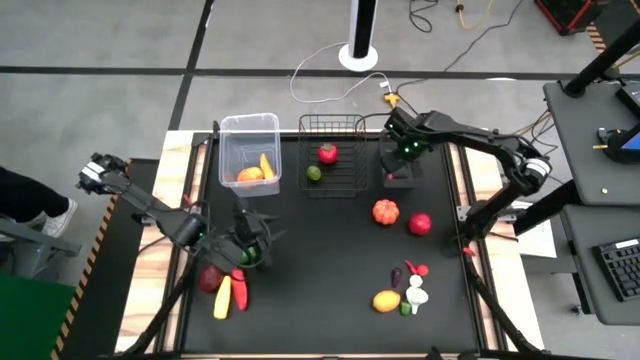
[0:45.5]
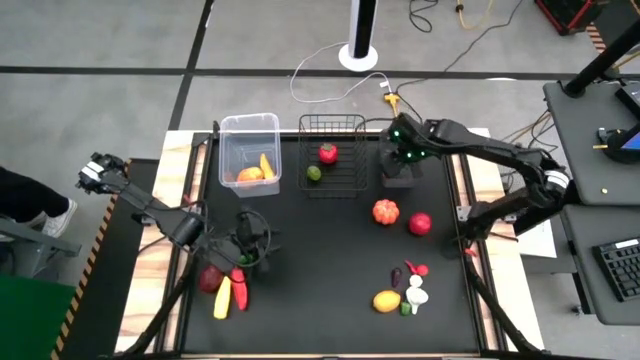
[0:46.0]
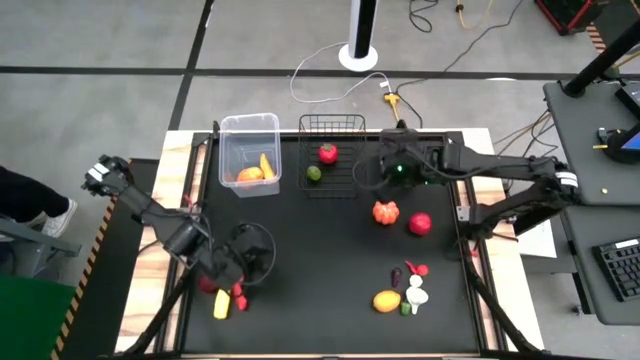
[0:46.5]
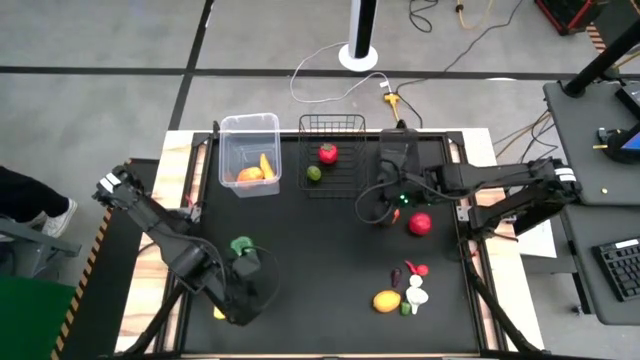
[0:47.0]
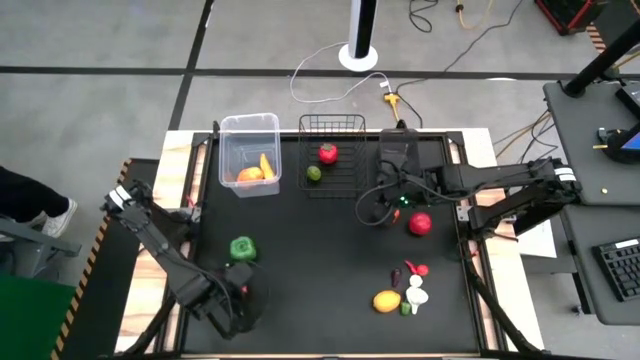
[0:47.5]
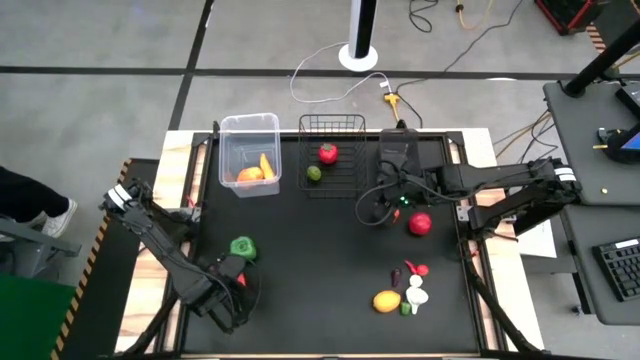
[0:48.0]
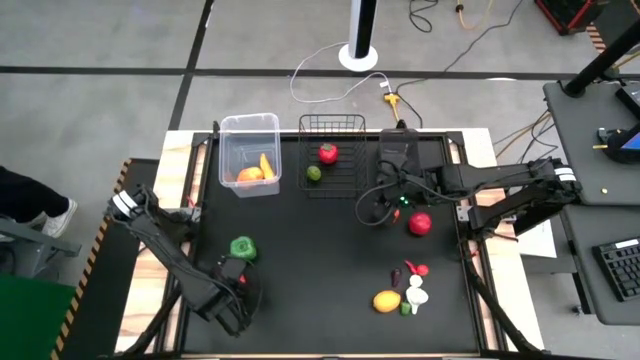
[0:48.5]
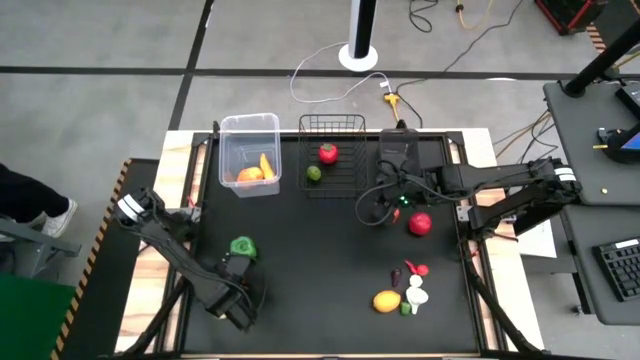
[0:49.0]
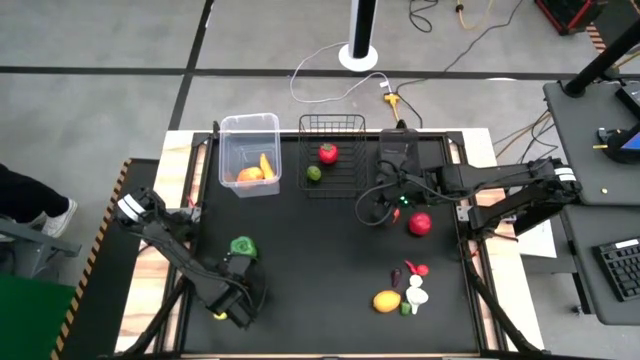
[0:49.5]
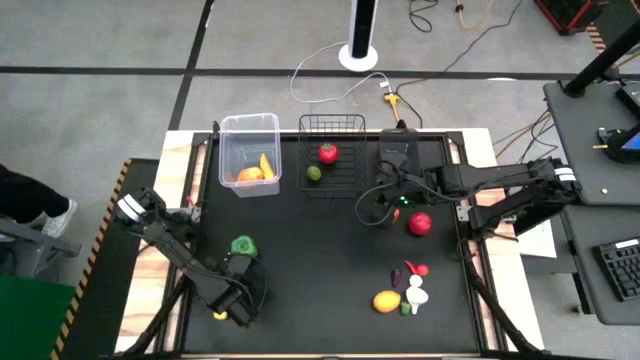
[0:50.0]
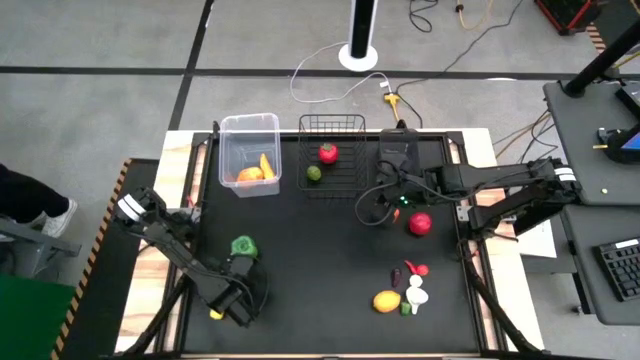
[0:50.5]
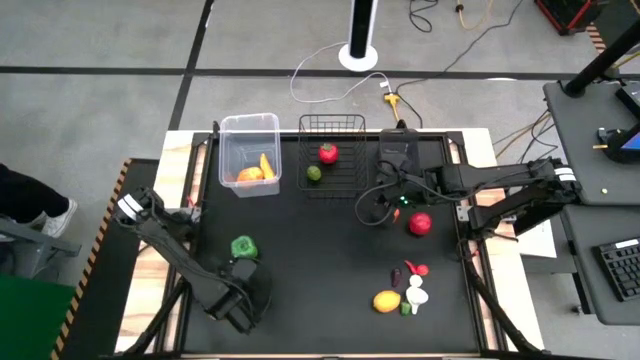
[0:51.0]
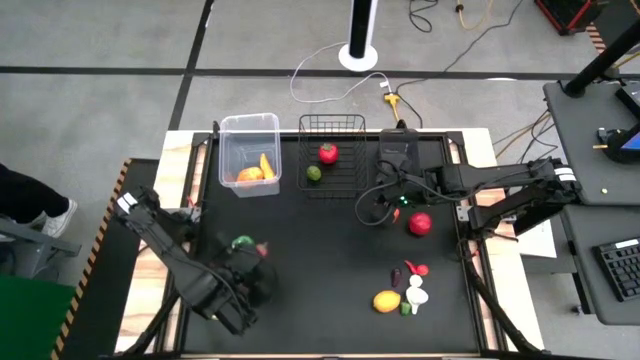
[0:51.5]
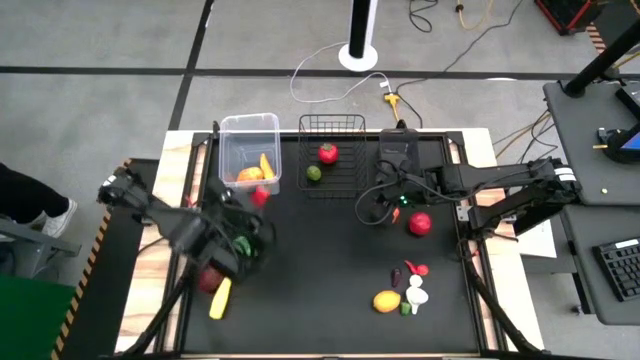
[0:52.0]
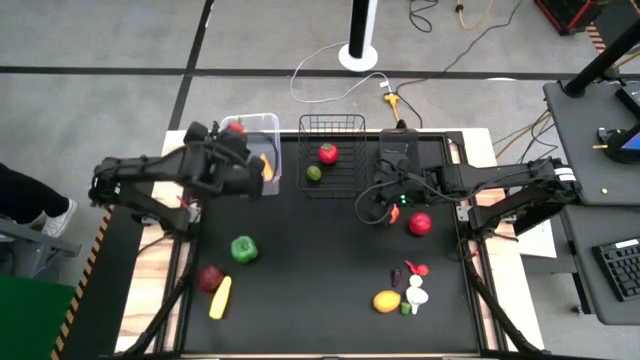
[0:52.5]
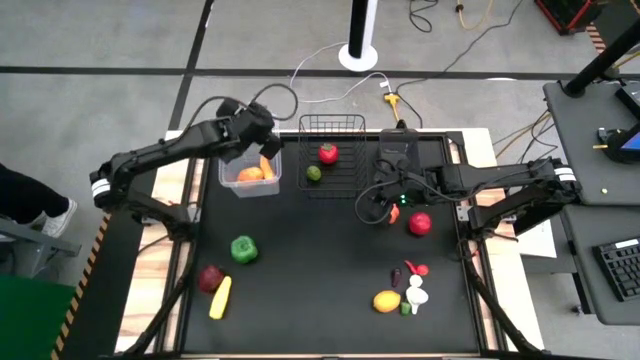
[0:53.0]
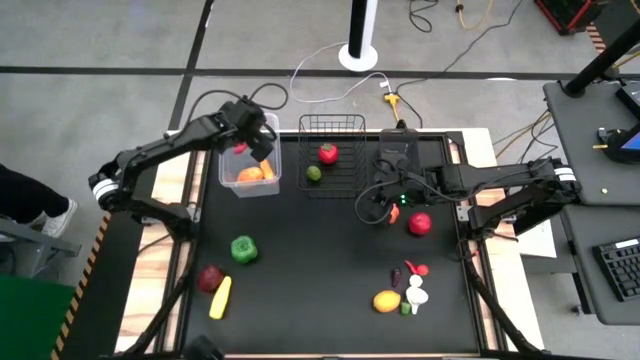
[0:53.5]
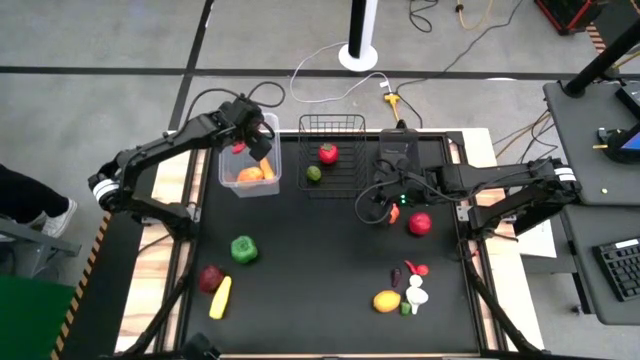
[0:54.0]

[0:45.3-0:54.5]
Task: Sort produce into baskets
Put the red chili pepper into the transparent basket

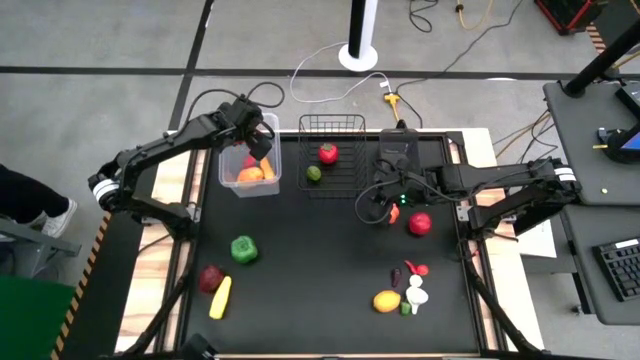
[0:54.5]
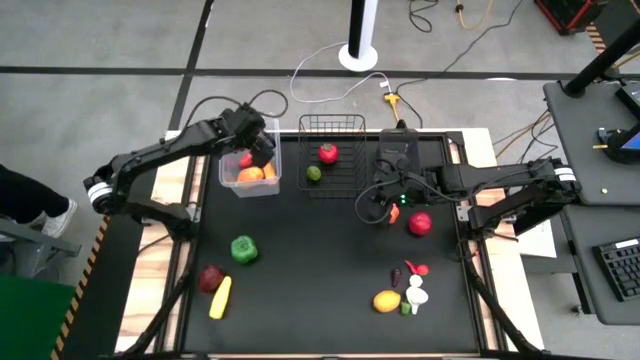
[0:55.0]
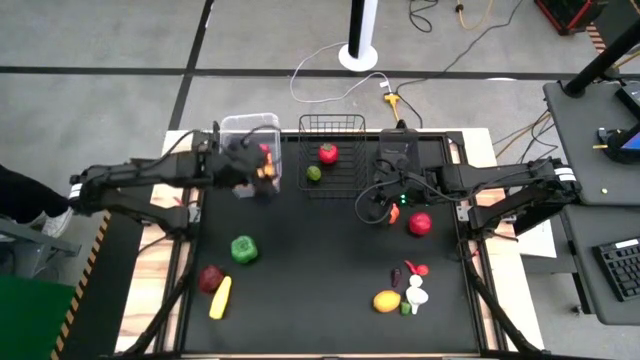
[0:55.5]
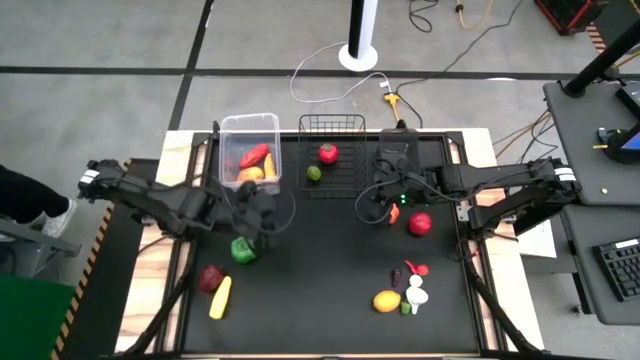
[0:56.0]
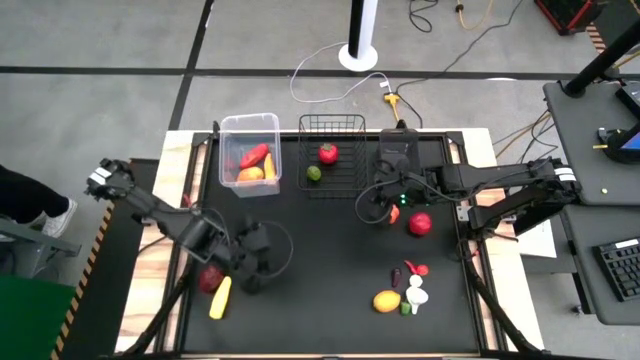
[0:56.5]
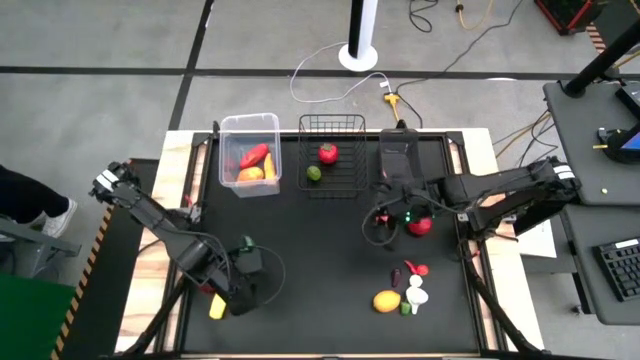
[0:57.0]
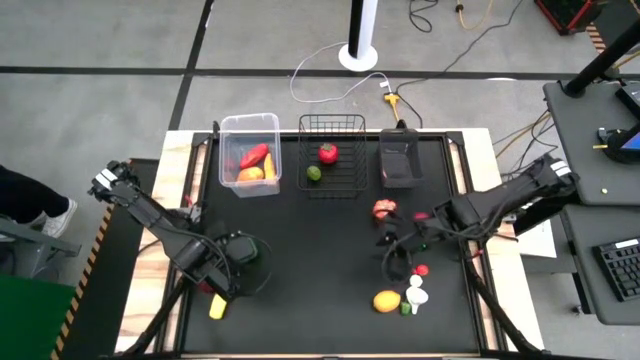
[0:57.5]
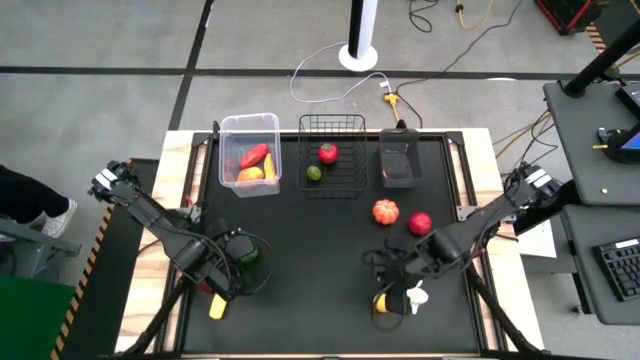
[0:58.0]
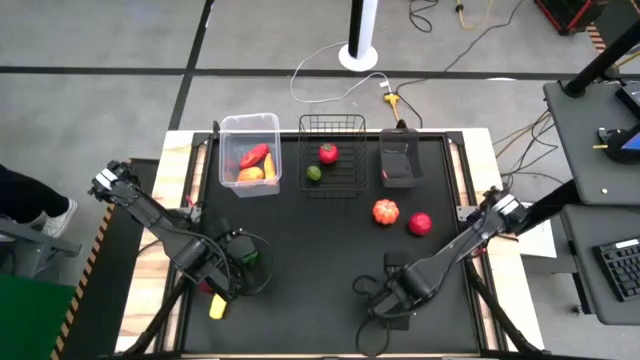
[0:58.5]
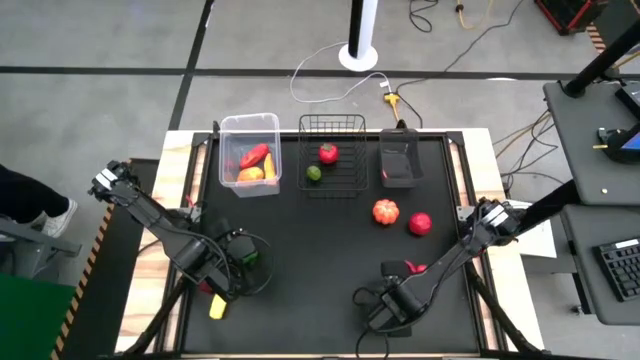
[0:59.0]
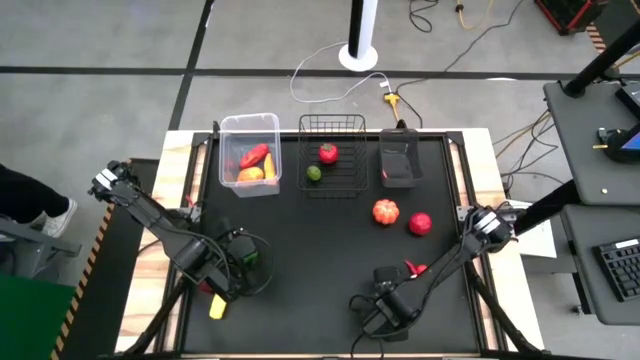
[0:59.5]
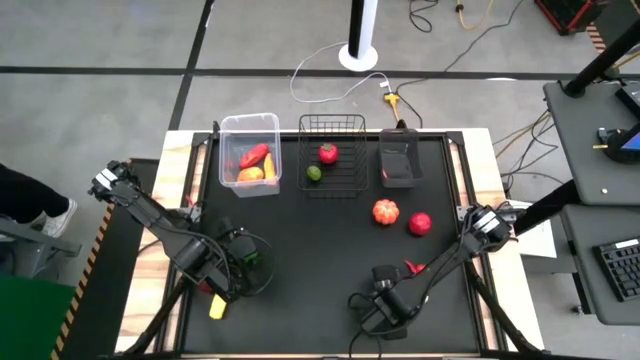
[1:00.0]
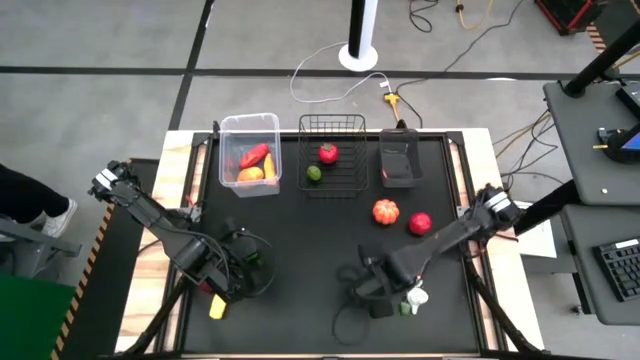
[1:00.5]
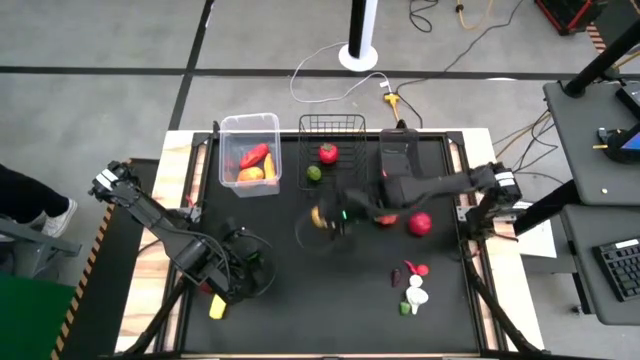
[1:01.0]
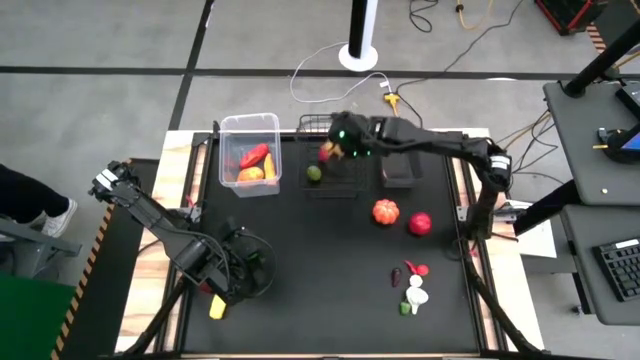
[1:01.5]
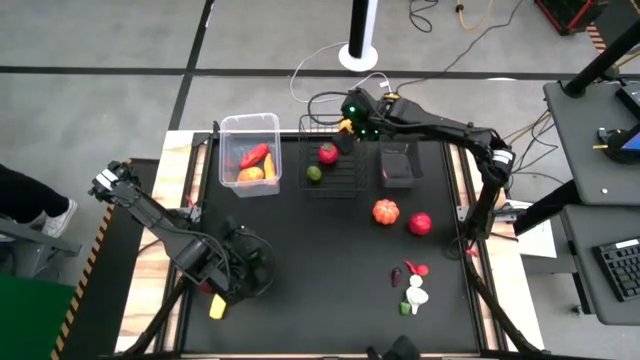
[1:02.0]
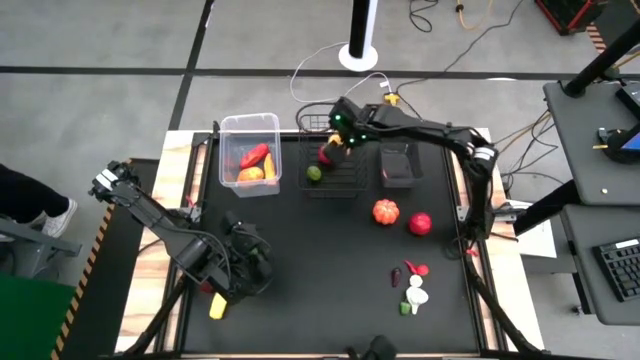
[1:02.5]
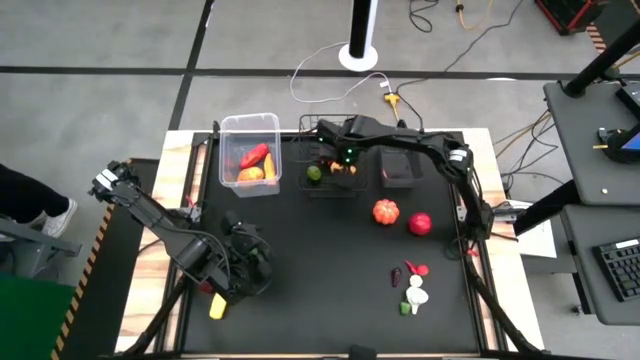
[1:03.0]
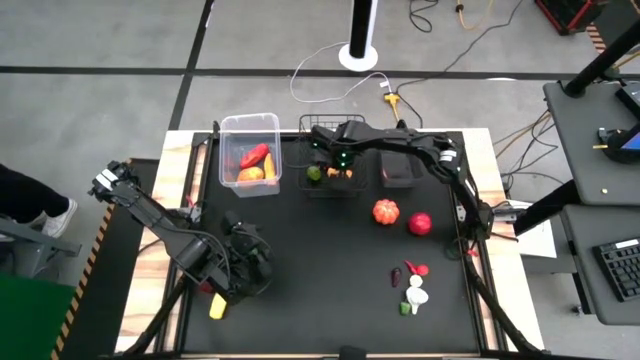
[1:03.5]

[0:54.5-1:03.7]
Put the lemon into the wire basket

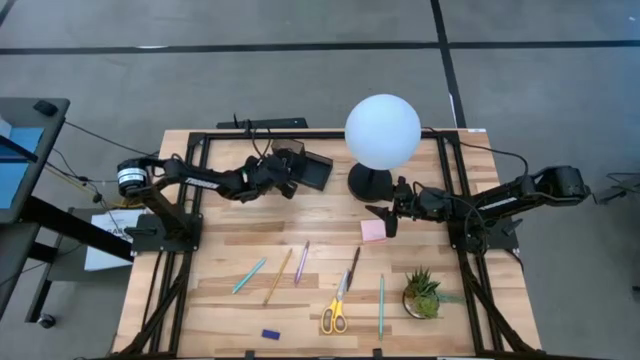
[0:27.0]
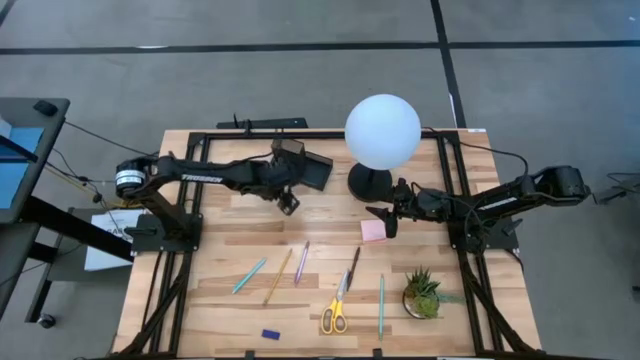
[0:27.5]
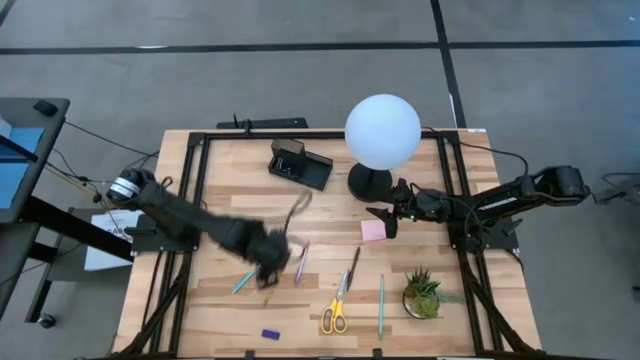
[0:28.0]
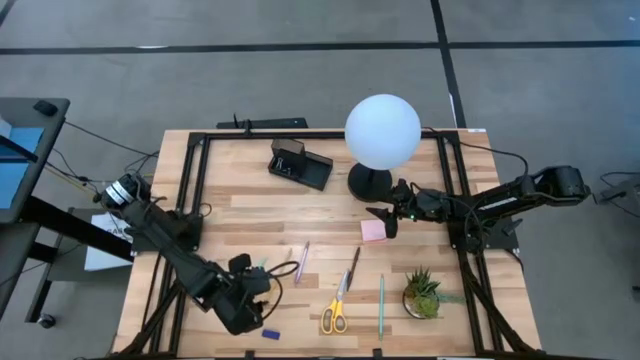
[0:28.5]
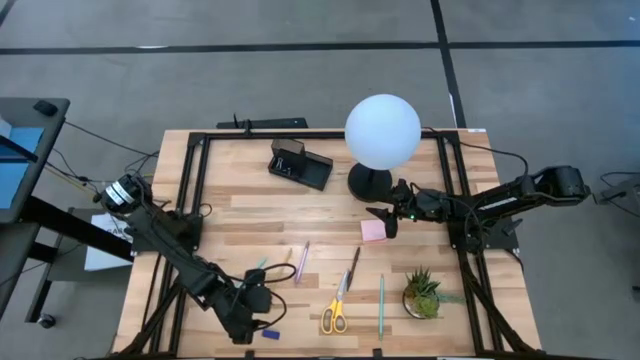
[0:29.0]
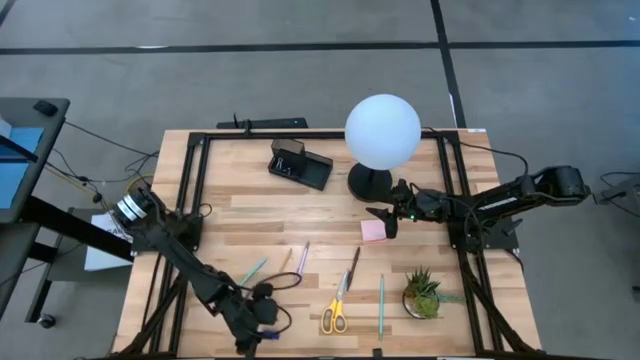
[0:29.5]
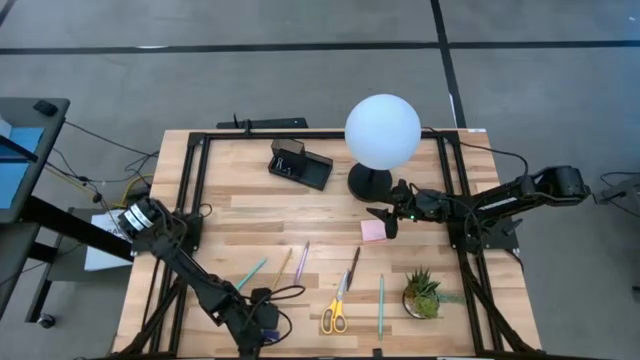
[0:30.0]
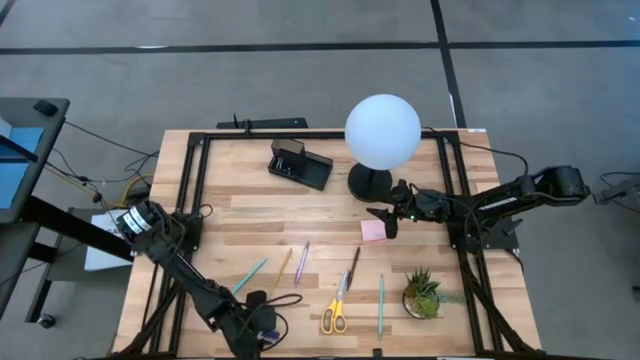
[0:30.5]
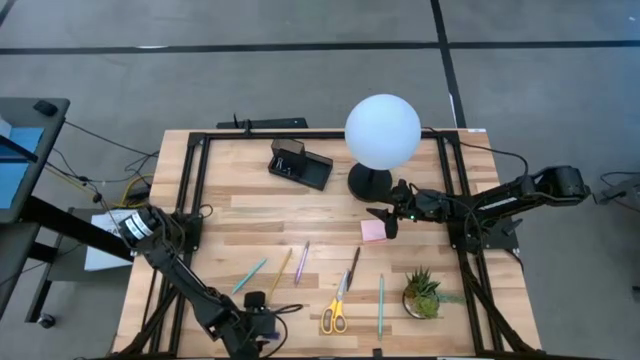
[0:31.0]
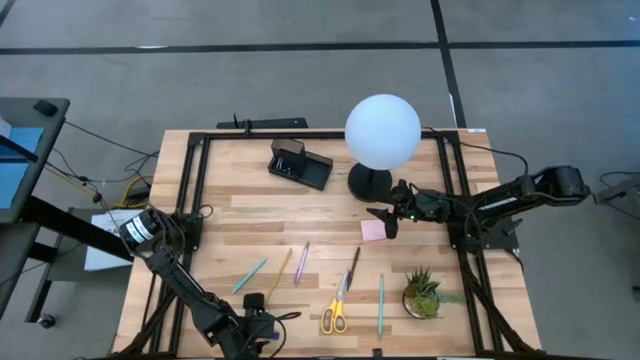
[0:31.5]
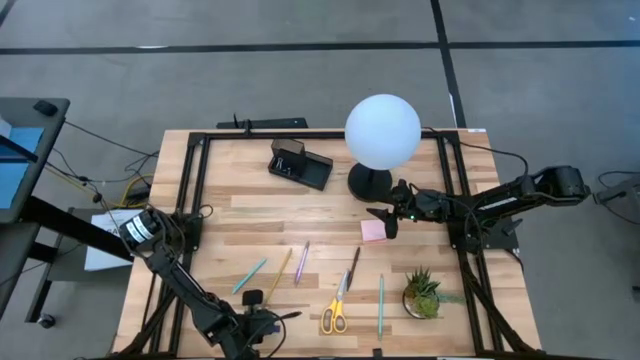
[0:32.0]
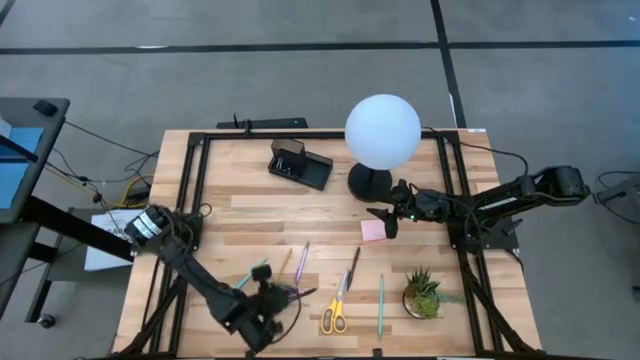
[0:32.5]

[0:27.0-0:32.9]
Task: Pick and place office supplies into organizer
Put the blue eraser into the black desk organizer
